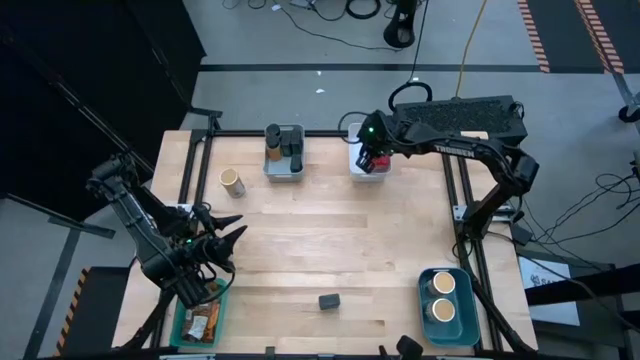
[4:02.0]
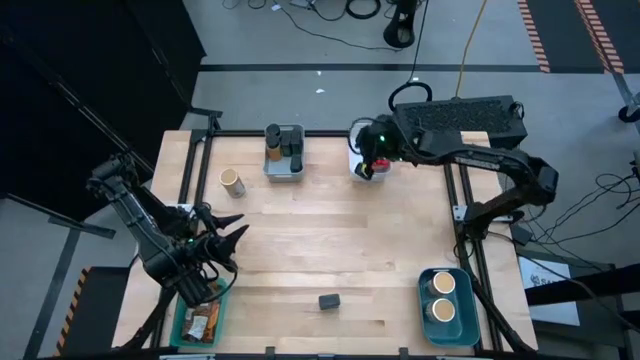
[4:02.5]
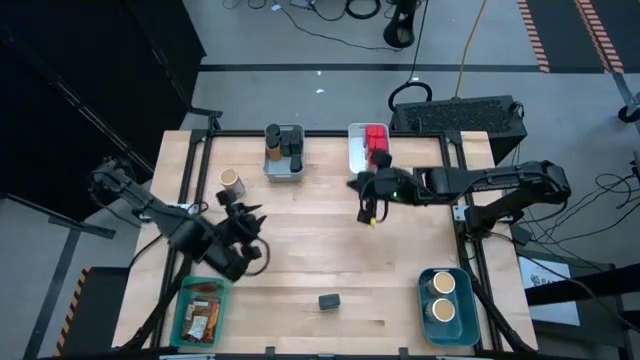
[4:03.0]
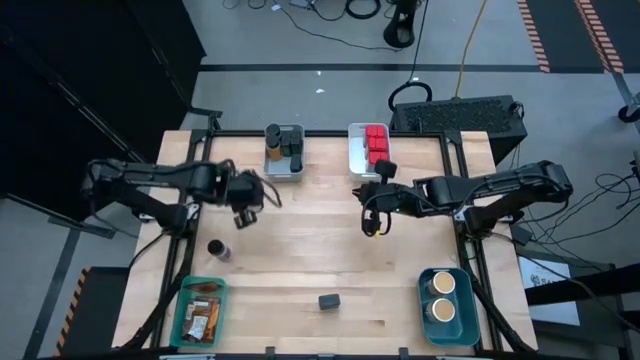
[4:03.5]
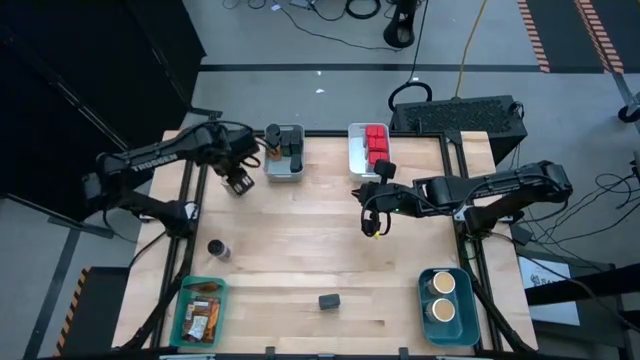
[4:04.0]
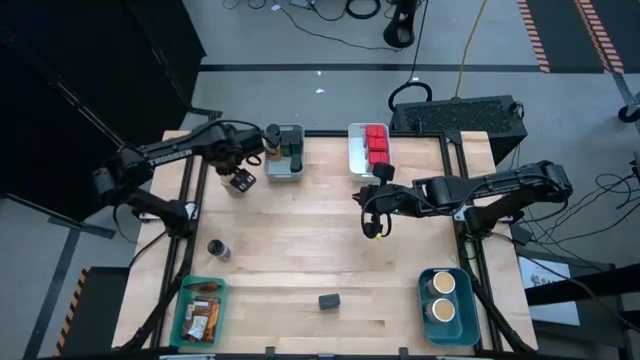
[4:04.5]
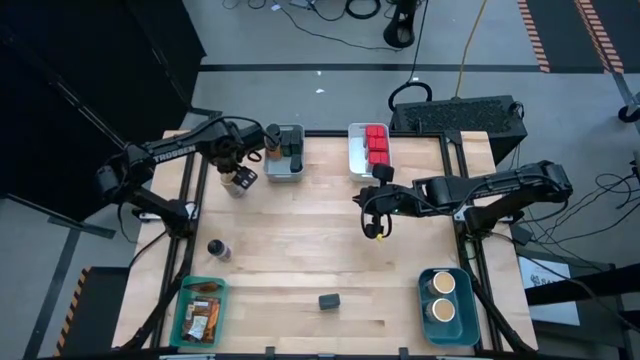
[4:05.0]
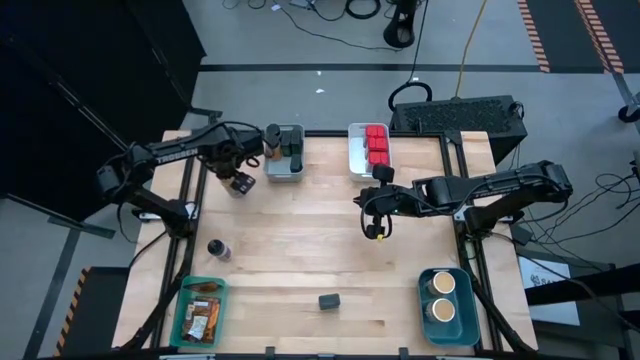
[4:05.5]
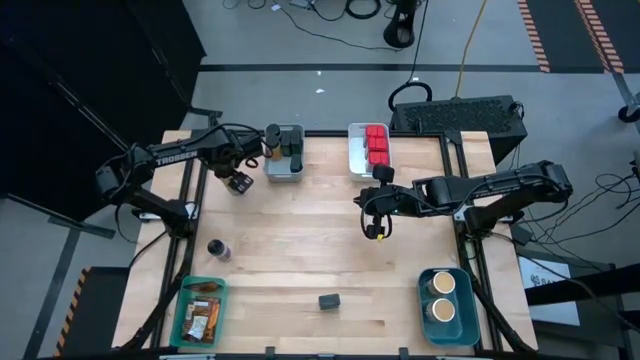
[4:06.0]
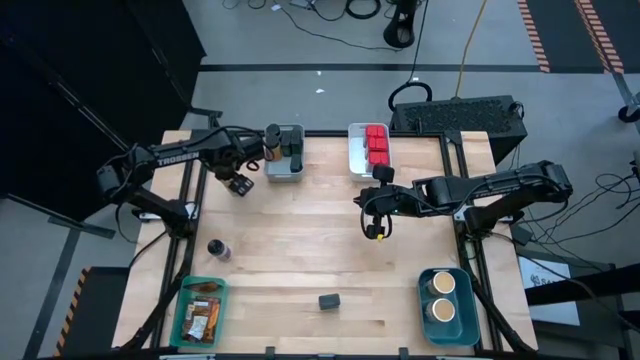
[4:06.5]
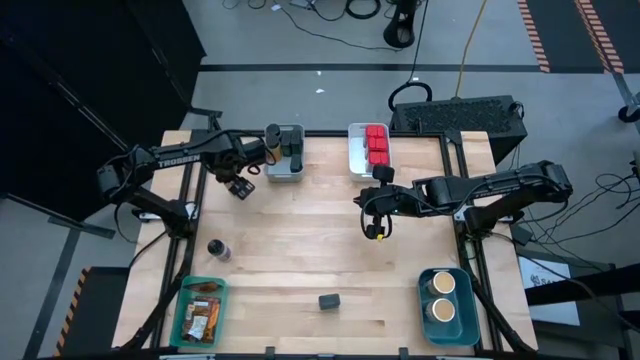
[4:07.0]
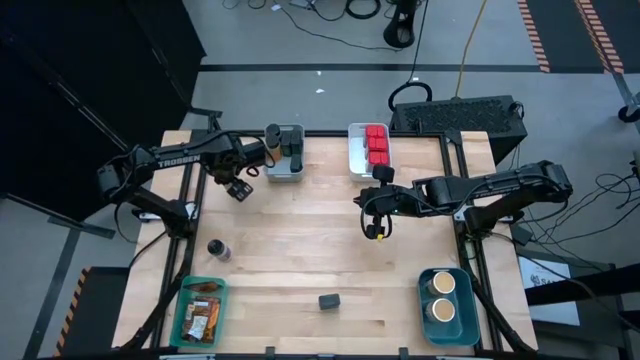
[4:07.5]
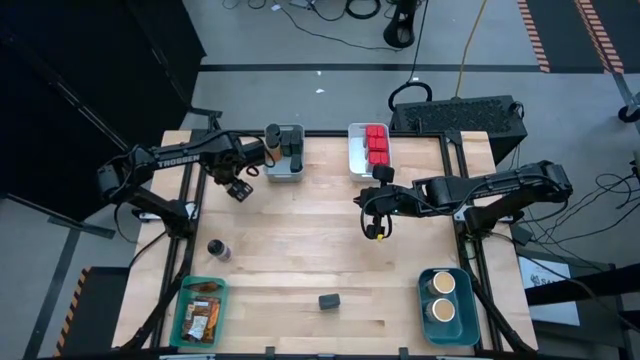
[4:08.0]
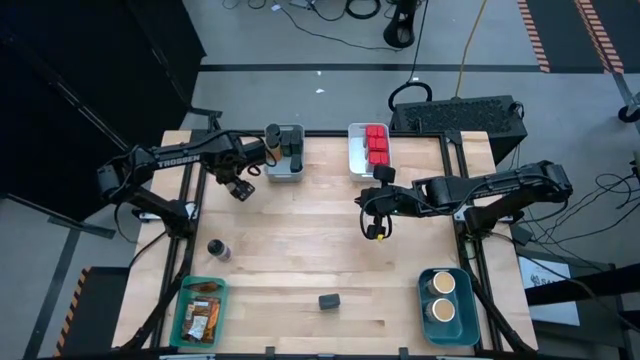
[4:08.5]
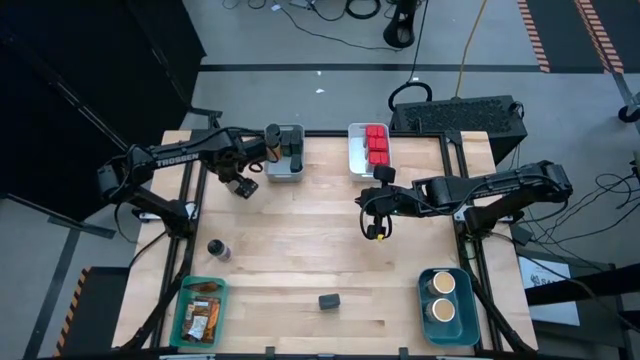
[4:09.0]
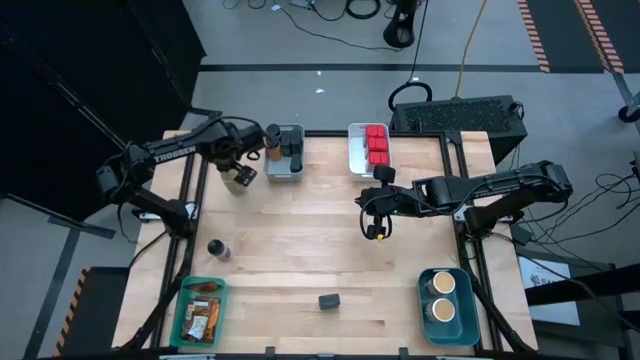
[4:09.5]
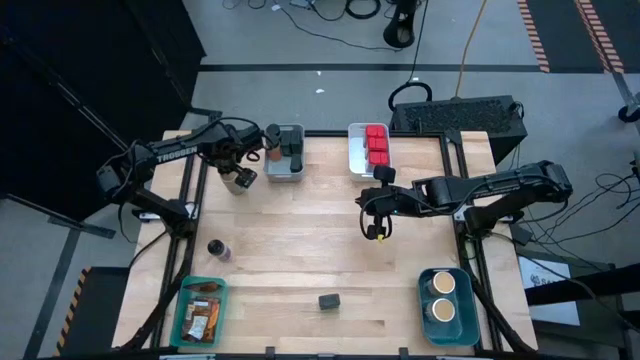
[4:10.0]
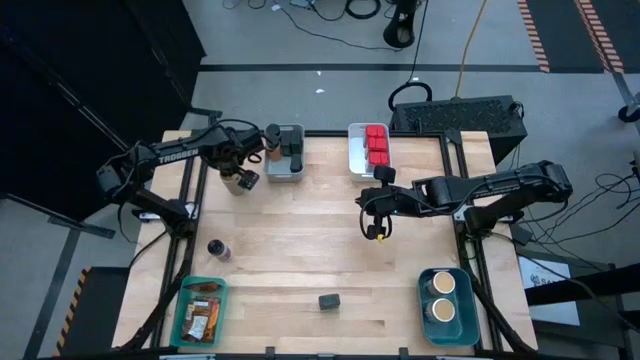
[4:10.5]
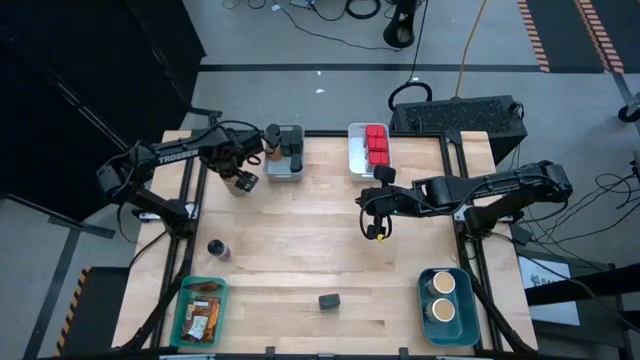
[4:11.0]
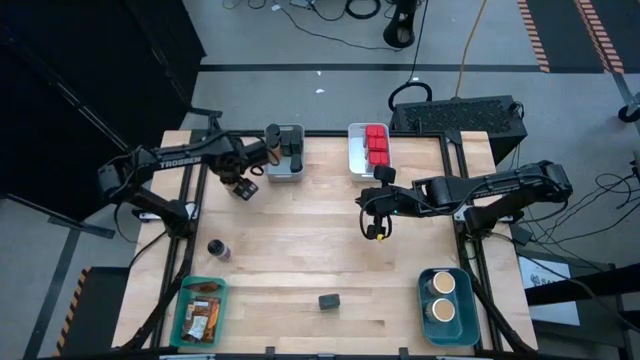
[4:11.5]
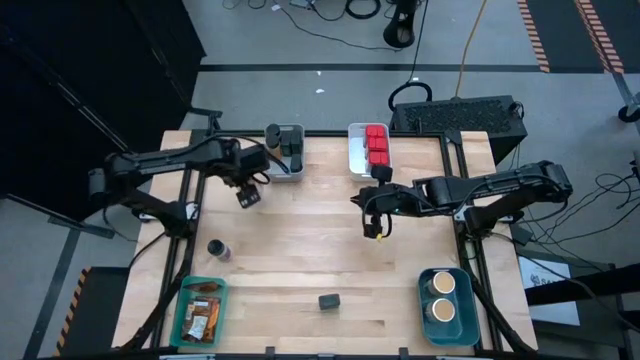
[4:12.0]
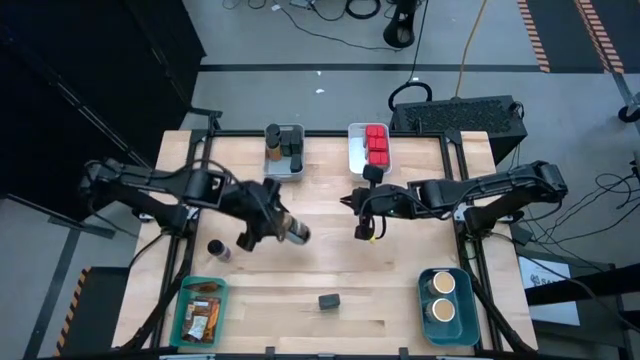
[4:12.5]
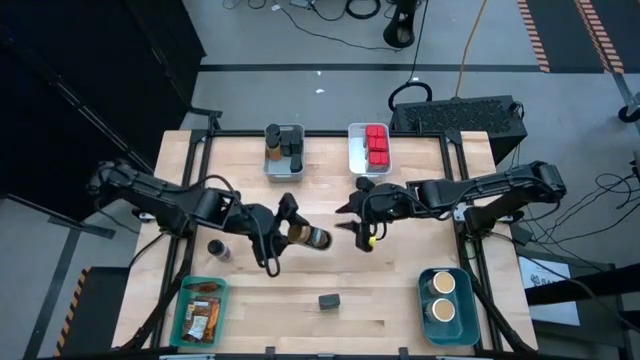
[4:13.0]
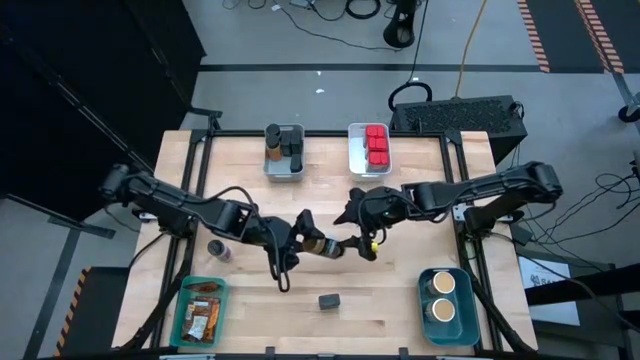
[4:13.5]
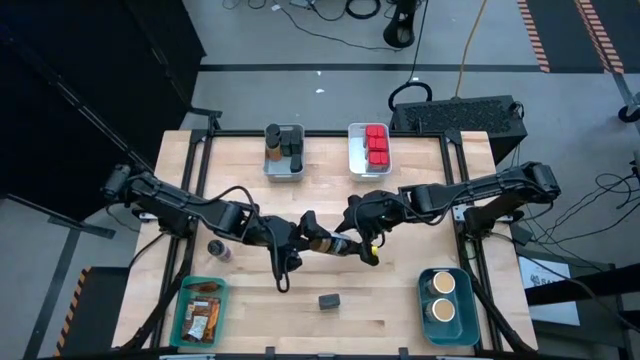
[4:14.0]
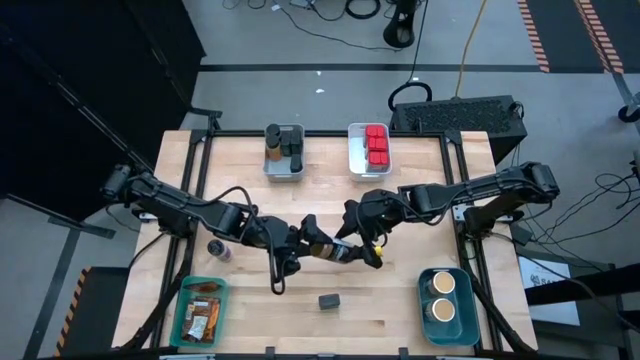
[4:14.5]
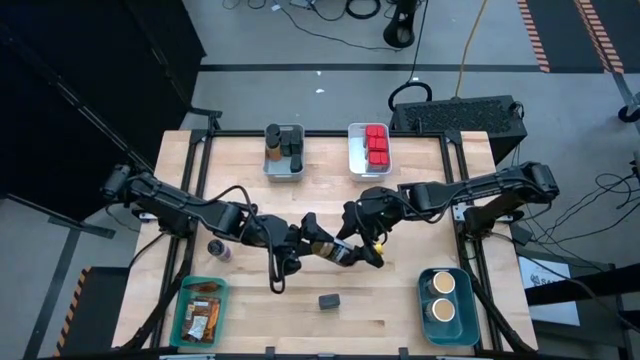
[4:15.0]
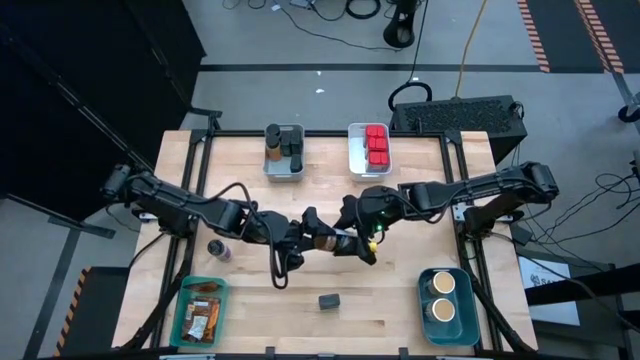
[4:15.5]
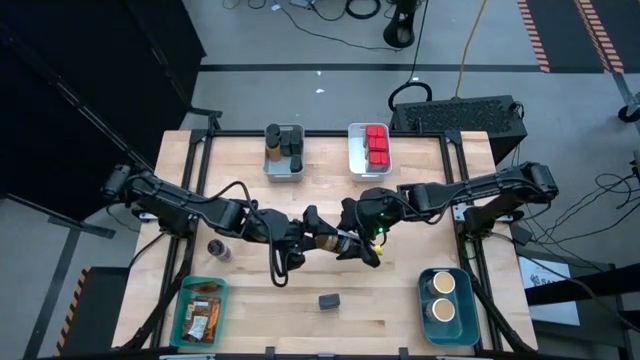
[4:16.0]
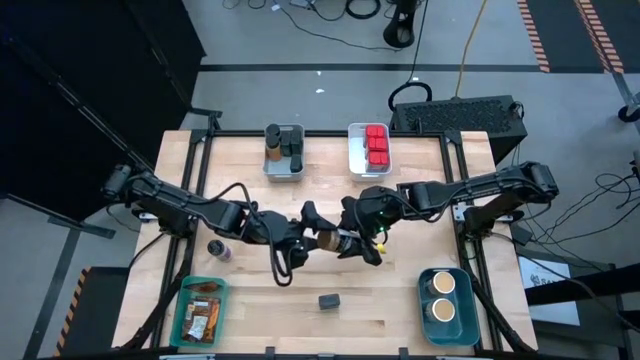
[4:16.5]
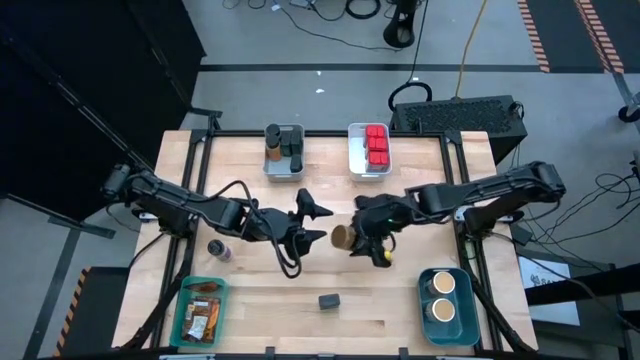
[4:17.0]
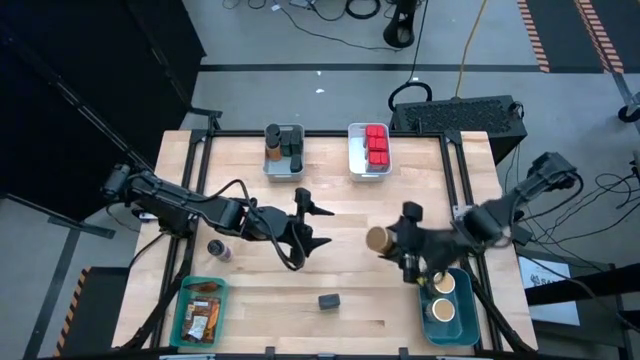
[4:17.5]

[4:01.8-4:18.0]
Task: Sort spices by type
Put the gold spice bottle into the blue bin

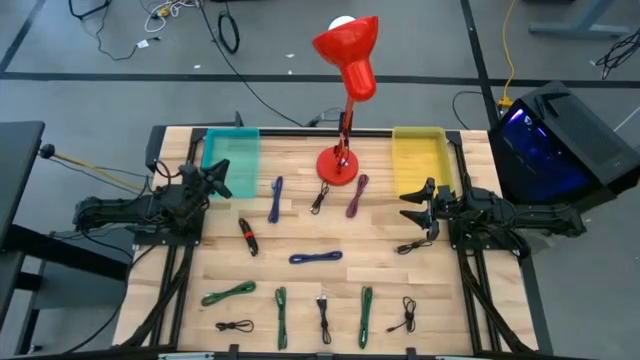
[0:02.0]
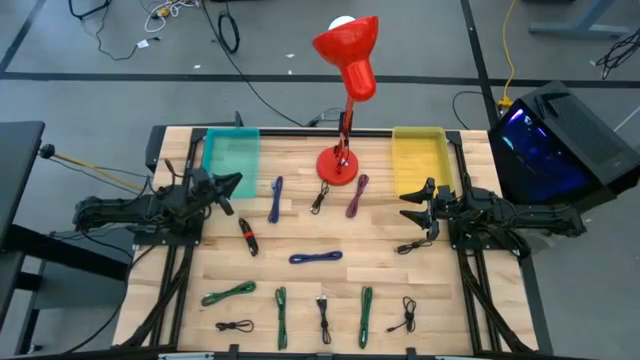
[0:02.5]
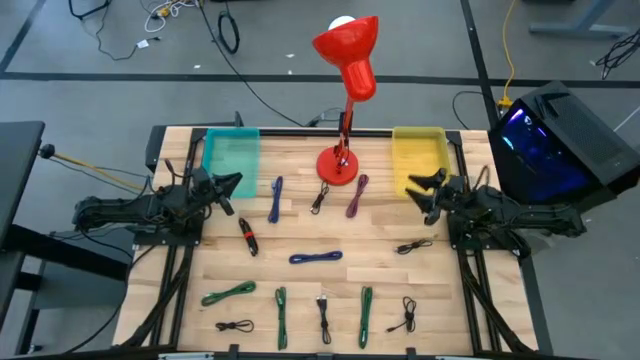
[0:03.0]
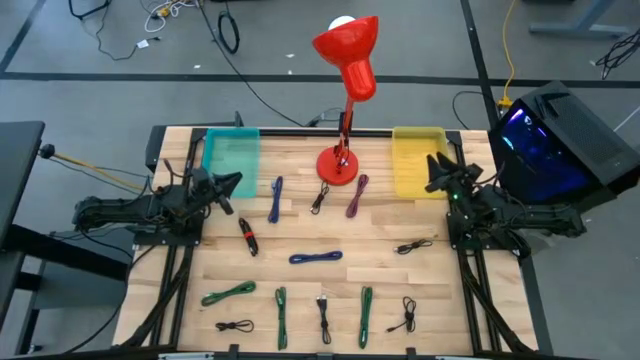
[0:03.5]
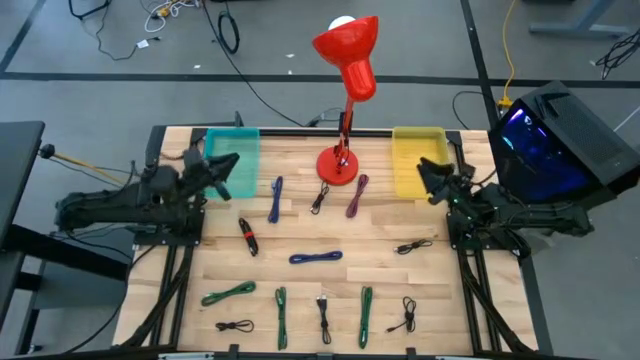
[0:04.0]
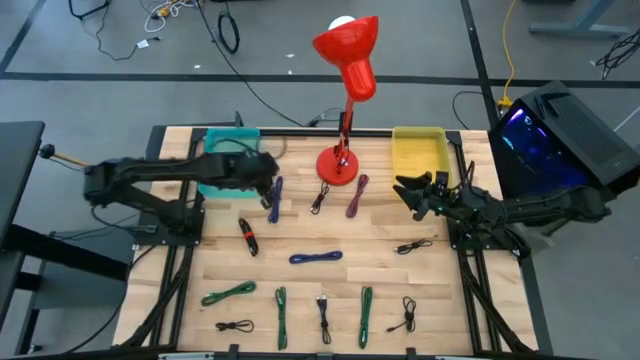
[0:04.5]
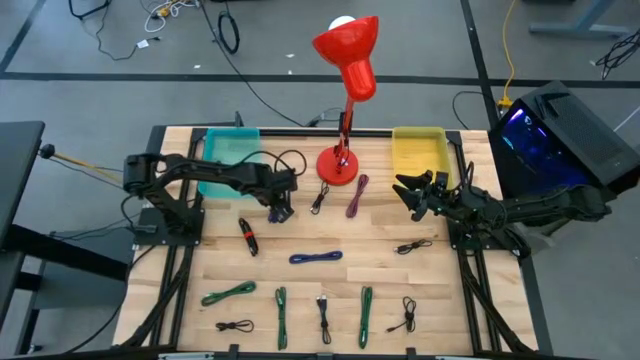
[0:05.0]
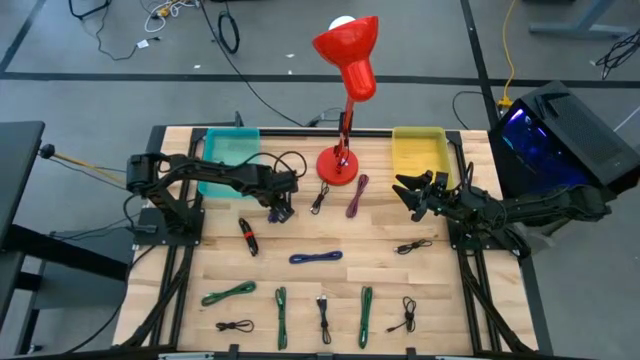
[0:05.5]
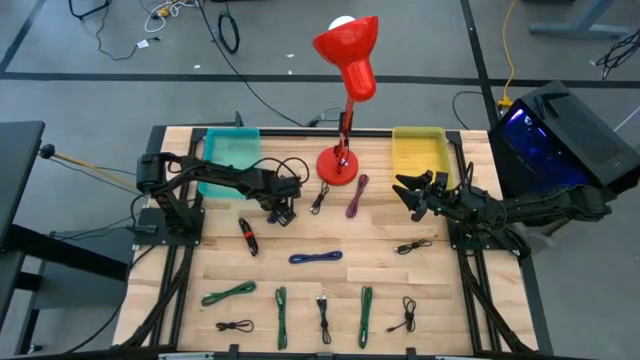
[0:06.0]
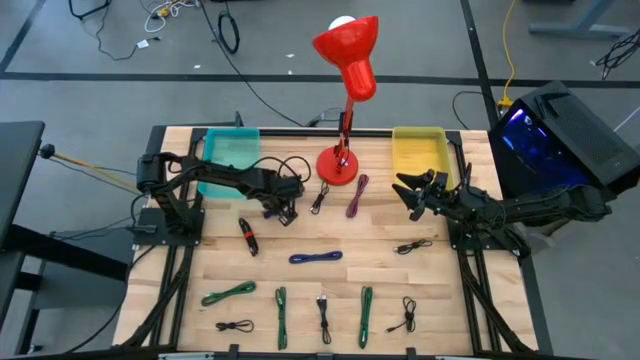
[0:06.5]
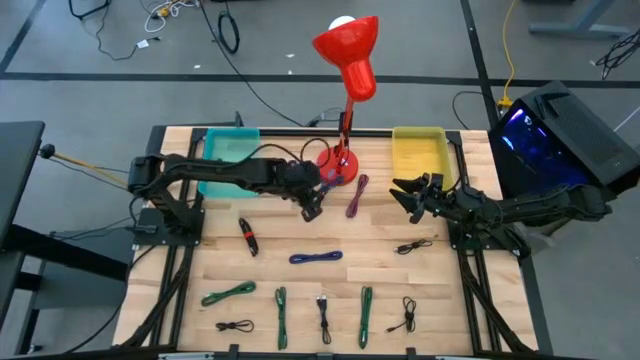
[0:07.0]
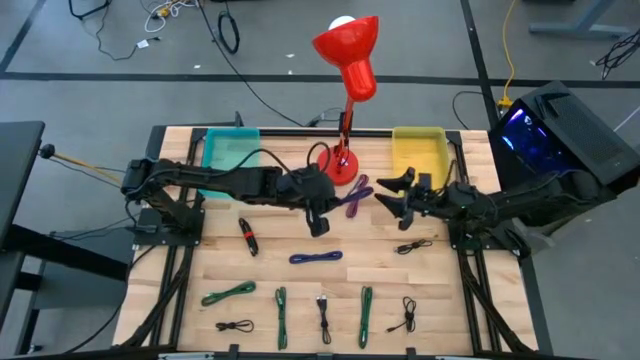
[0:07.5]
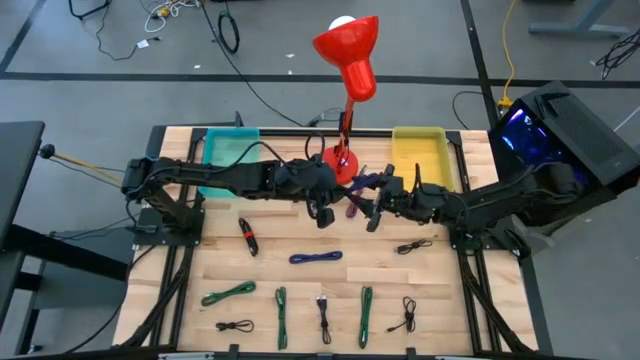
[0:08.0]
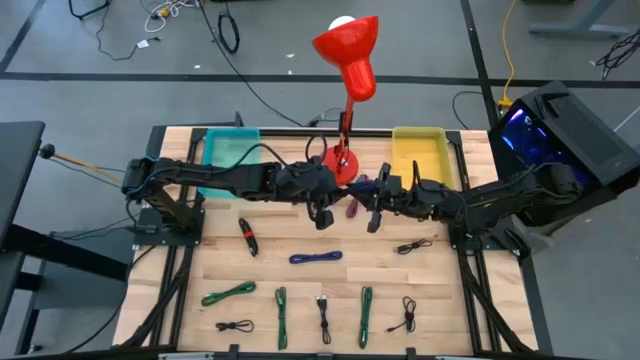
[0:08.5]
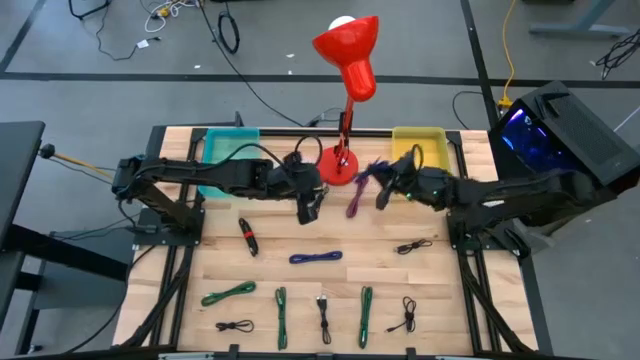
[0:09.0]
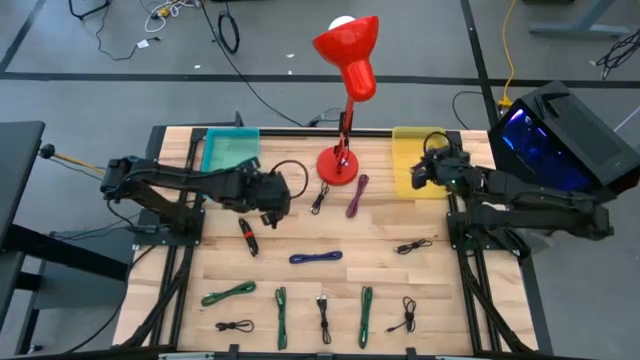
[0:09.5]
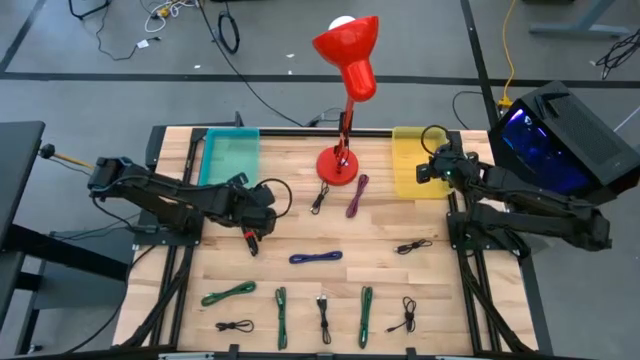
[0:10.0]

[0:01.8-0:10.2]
Task: Pick & Place USB Port
Put the black violet USB cable into the yellow bin
